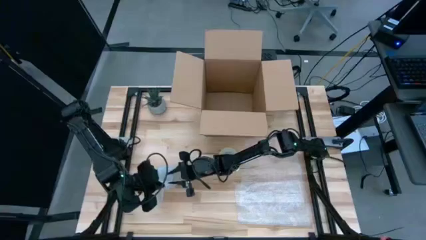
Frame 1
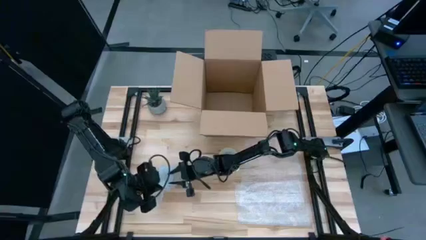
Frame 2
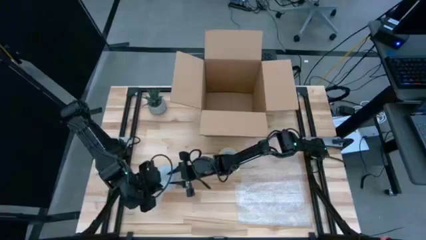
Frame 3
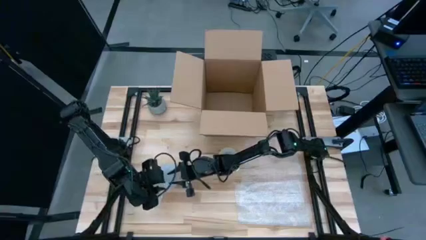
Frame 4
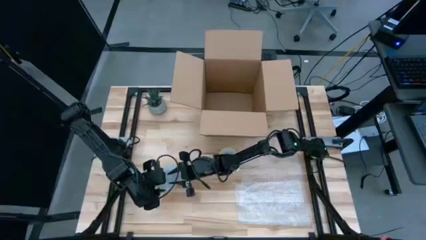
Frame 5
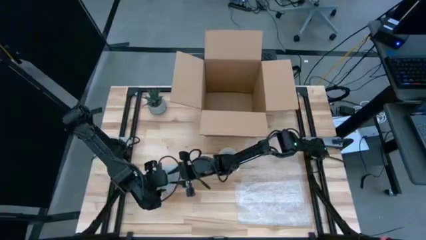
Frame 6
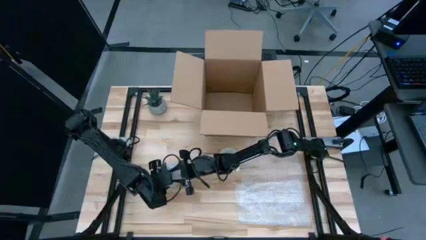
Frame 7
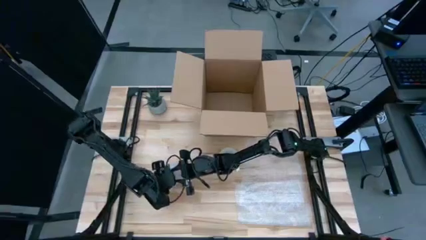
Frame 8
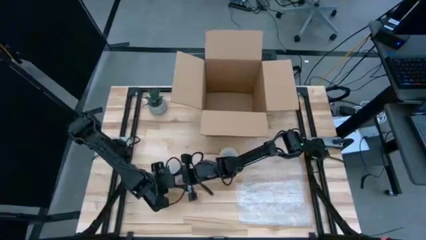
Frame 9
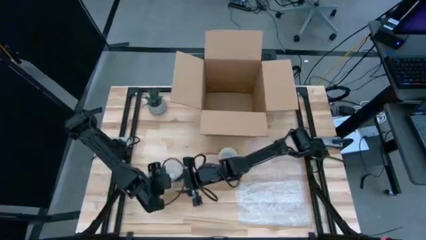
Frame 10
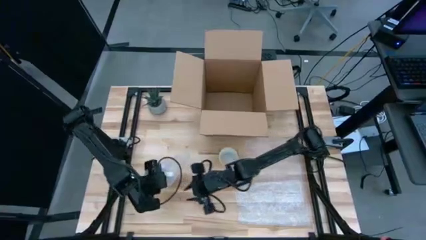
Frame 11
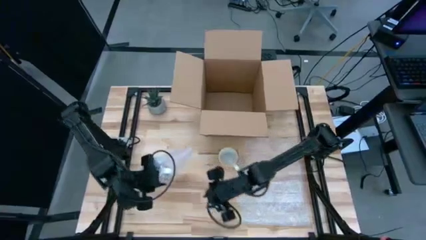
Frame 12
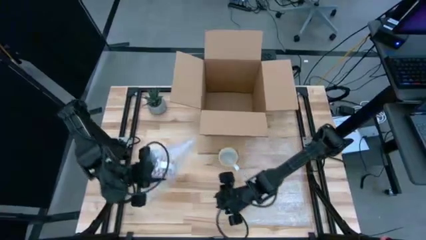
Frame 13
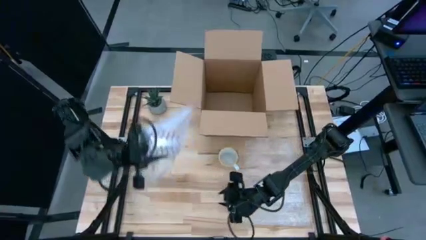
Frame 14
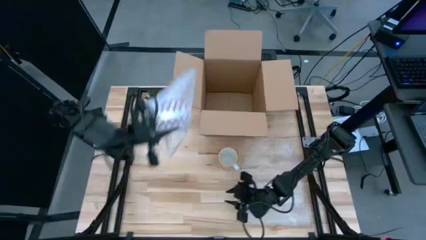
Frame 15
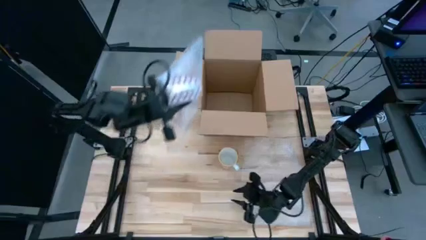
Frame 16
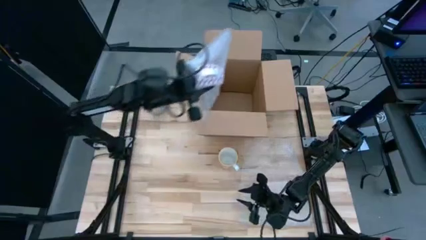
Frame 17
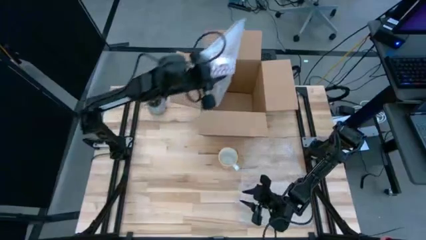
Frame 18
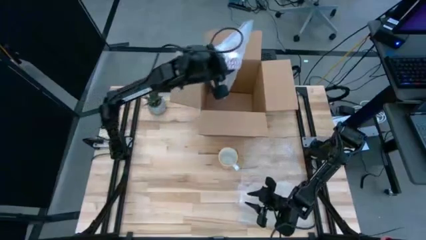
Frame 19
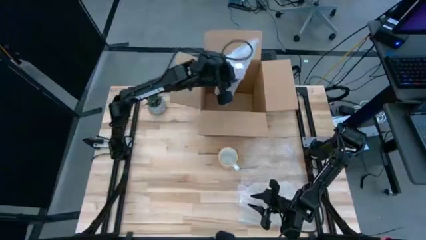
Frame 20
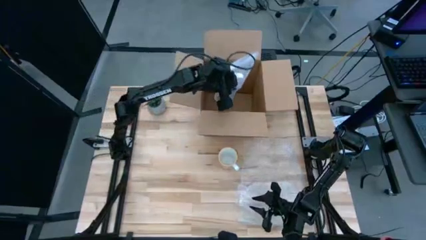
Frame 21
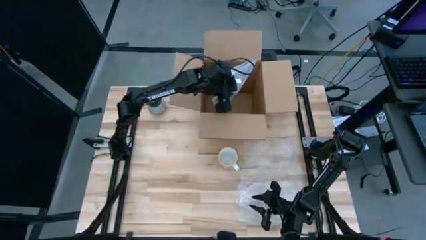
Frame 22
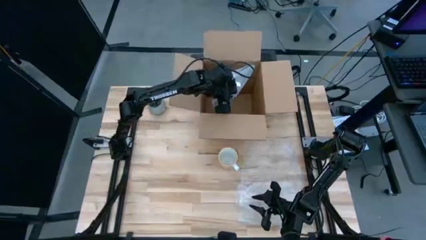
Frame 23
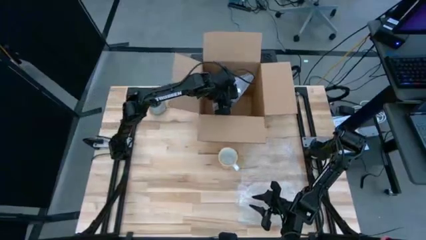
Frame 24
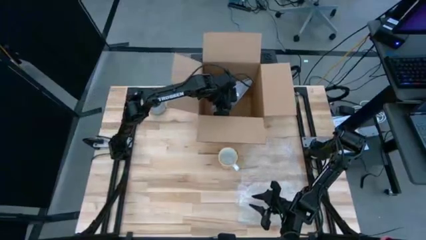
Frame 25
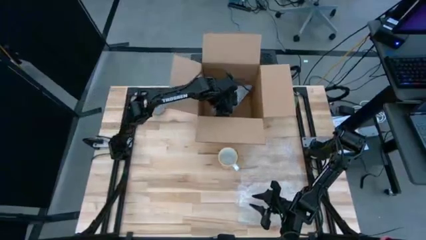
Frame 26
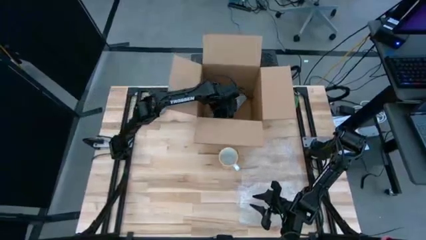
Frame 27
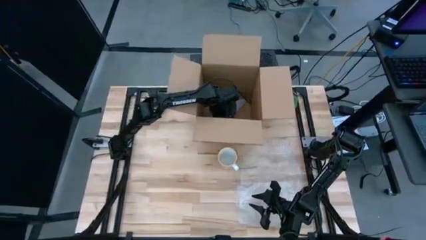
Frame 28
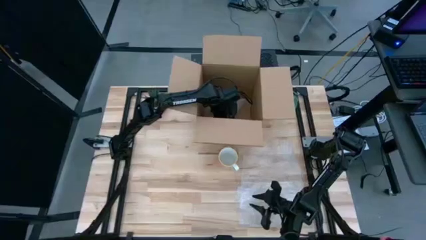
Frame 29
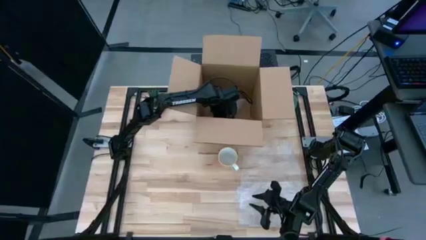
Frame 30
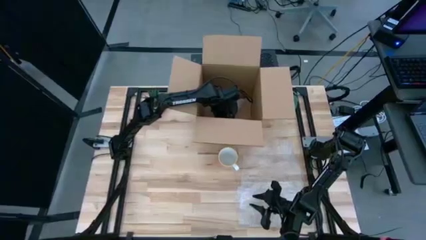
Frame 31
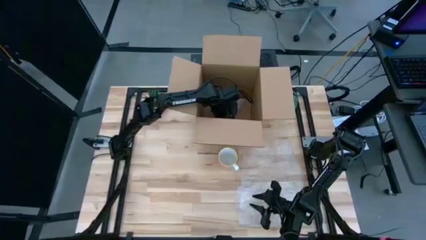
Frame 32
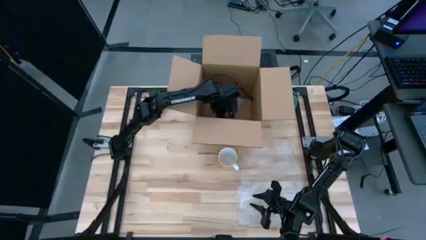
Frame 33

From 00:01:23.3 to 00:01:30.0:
Task: wrap mug
Put the wrapped red mug into the box

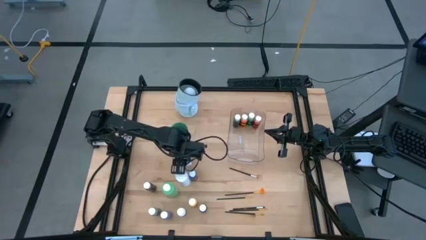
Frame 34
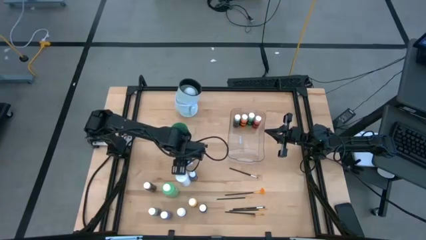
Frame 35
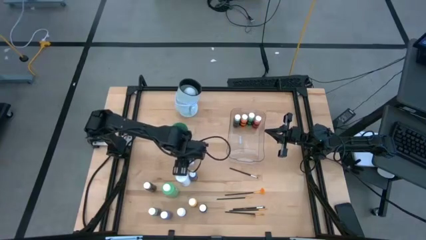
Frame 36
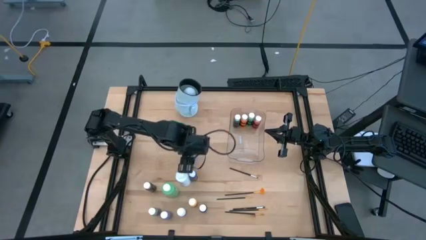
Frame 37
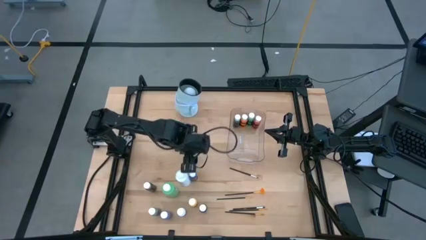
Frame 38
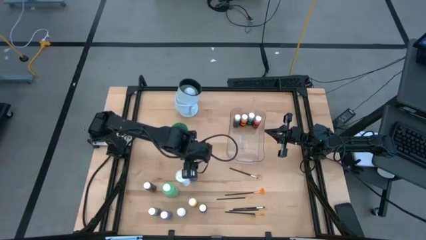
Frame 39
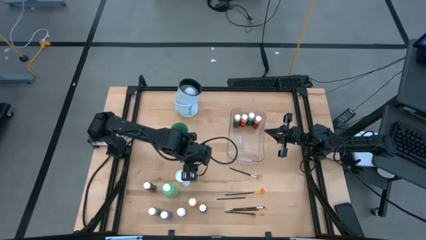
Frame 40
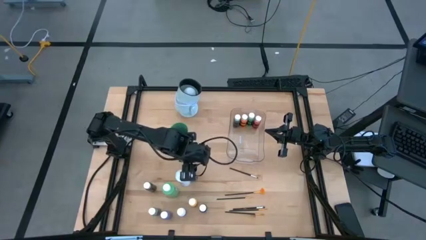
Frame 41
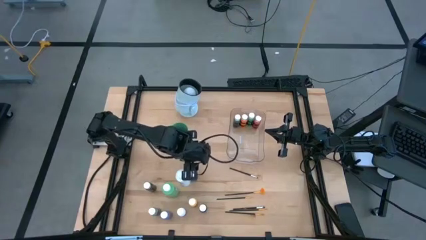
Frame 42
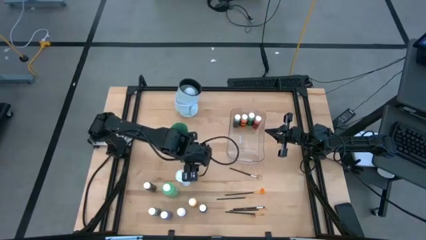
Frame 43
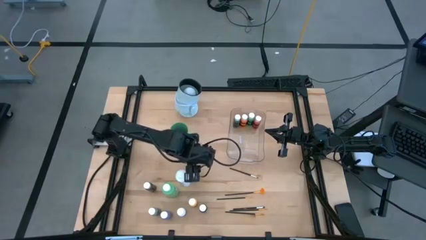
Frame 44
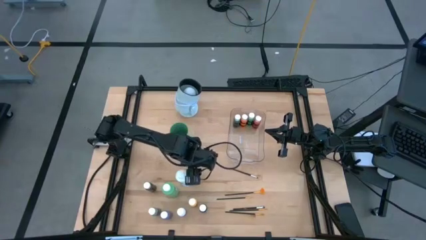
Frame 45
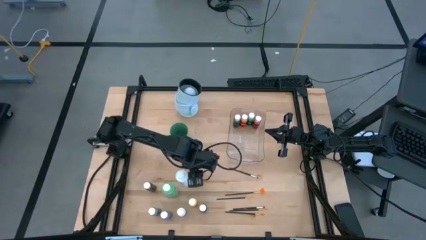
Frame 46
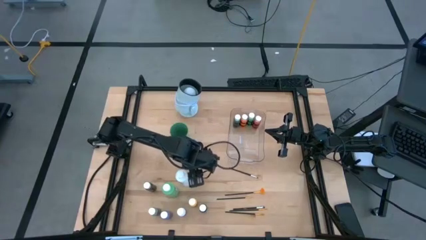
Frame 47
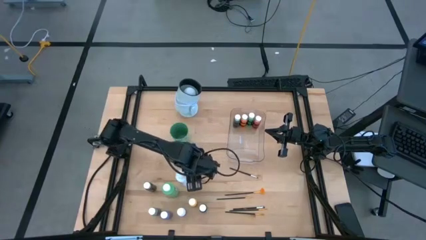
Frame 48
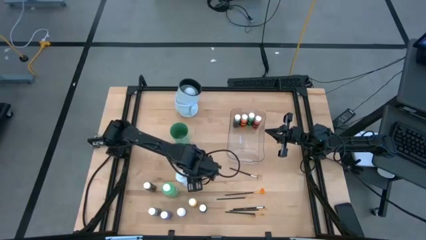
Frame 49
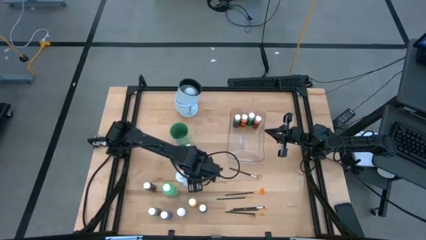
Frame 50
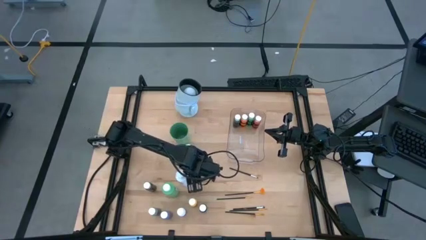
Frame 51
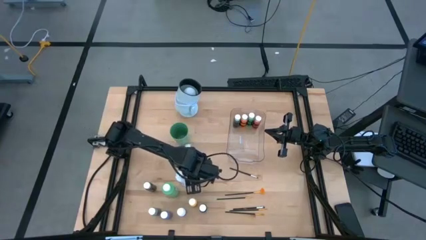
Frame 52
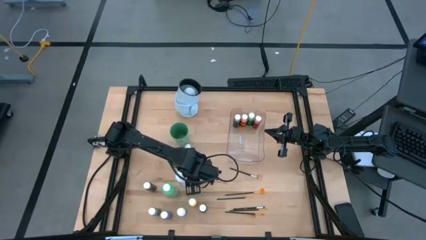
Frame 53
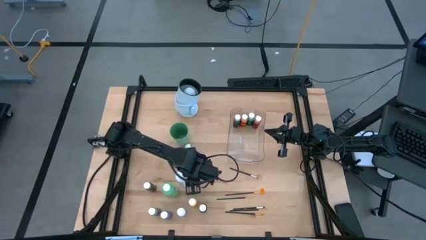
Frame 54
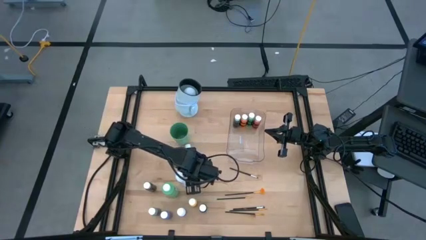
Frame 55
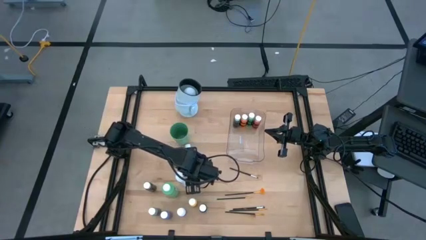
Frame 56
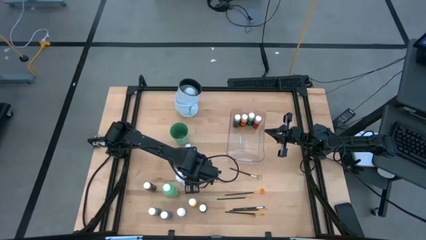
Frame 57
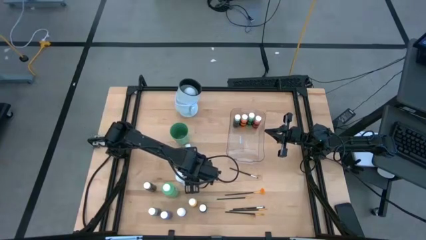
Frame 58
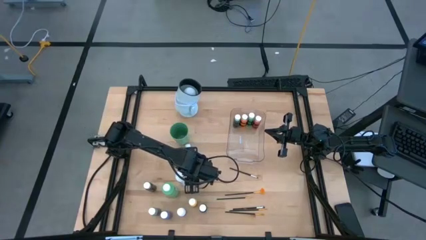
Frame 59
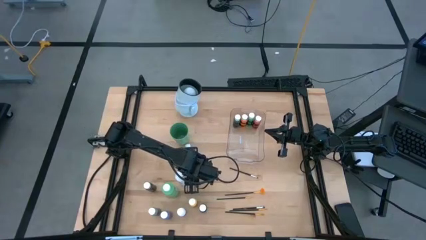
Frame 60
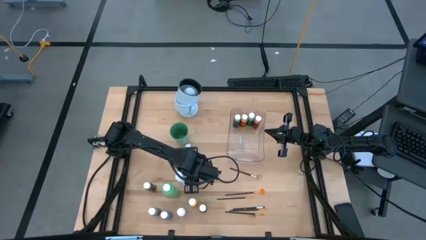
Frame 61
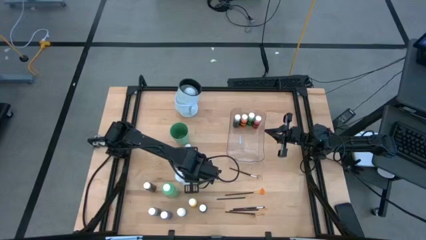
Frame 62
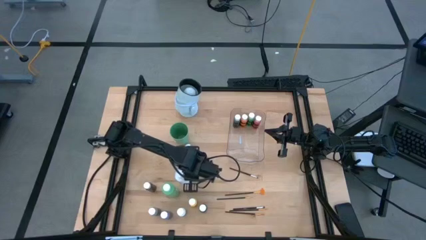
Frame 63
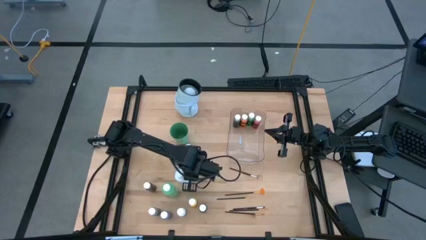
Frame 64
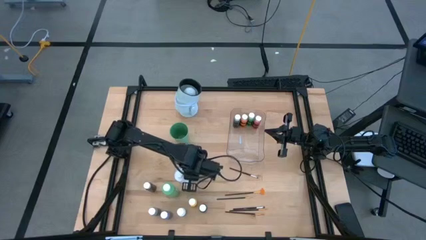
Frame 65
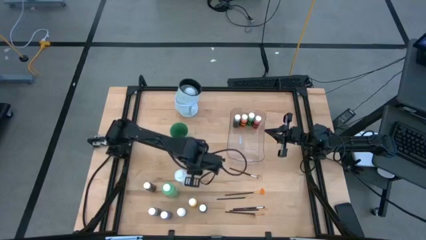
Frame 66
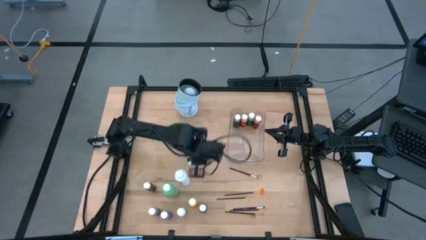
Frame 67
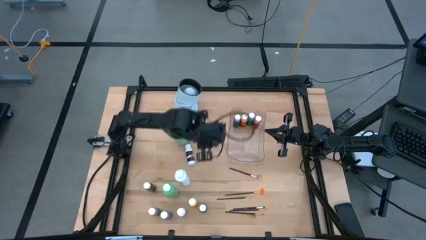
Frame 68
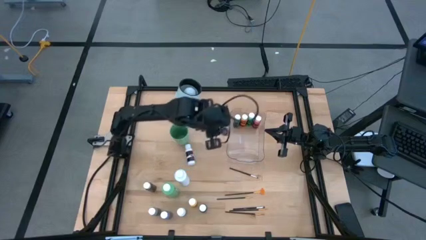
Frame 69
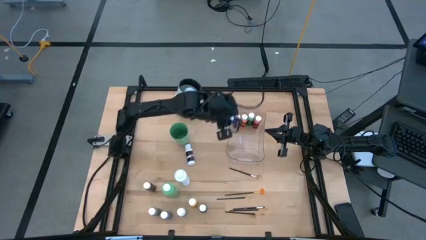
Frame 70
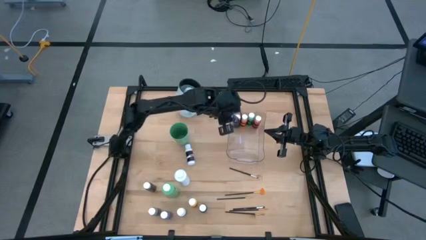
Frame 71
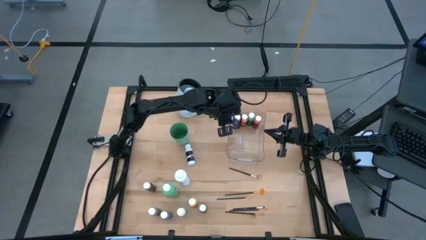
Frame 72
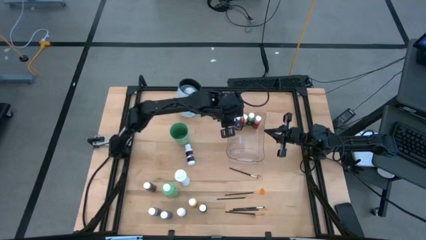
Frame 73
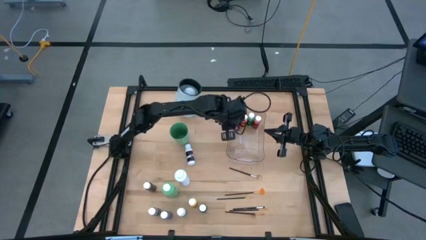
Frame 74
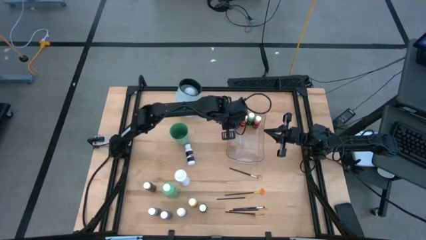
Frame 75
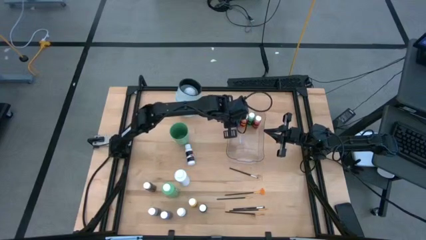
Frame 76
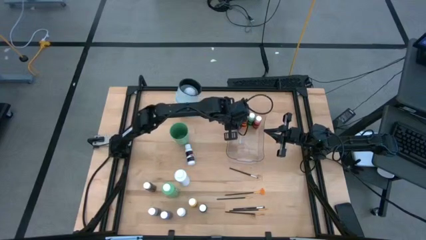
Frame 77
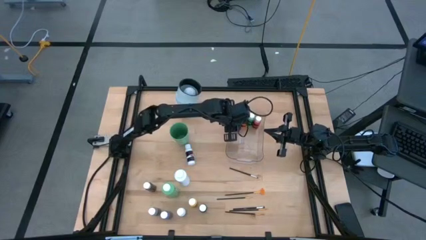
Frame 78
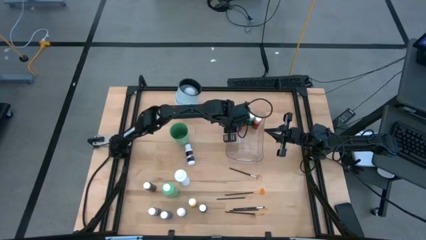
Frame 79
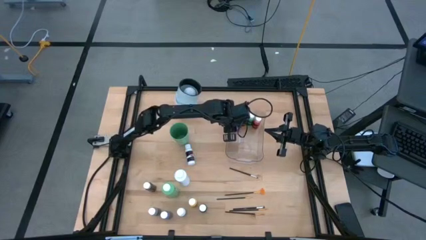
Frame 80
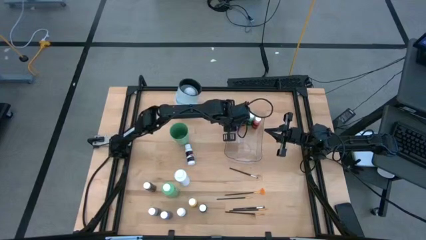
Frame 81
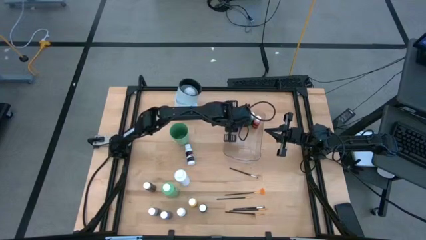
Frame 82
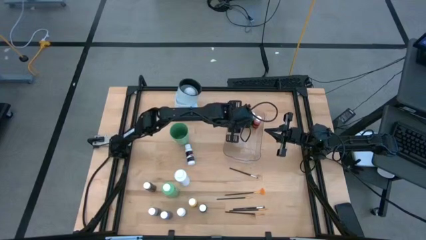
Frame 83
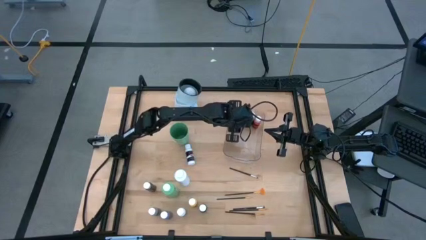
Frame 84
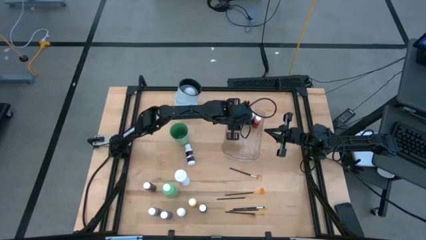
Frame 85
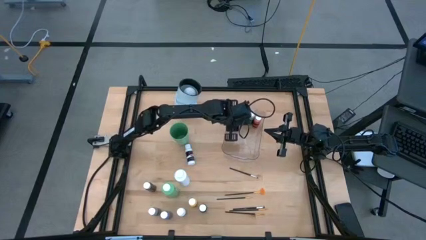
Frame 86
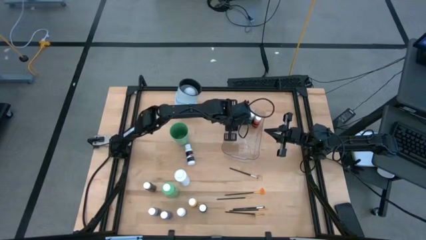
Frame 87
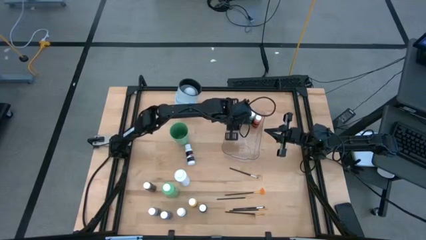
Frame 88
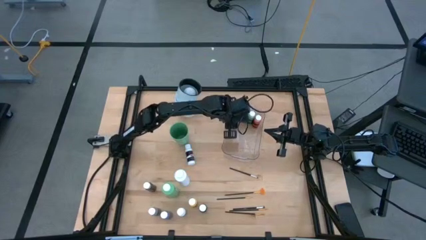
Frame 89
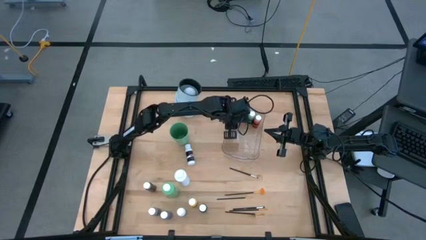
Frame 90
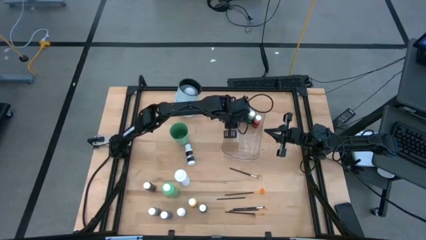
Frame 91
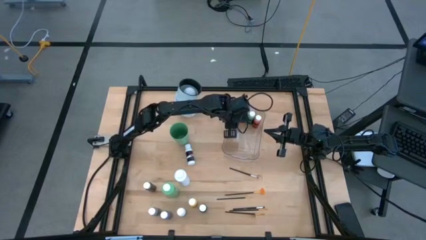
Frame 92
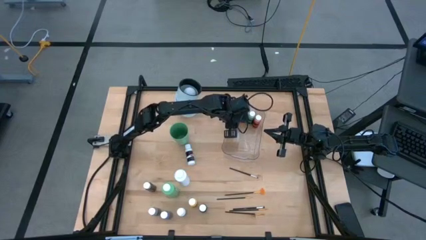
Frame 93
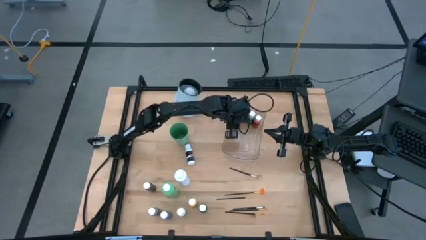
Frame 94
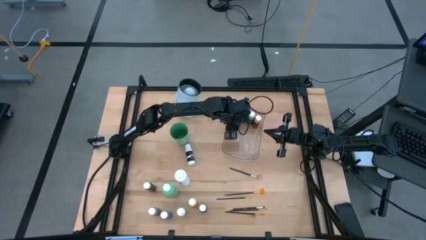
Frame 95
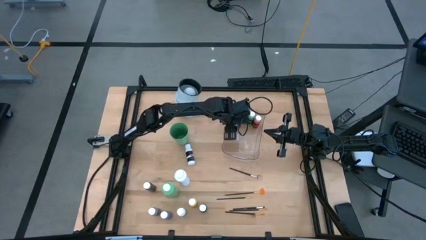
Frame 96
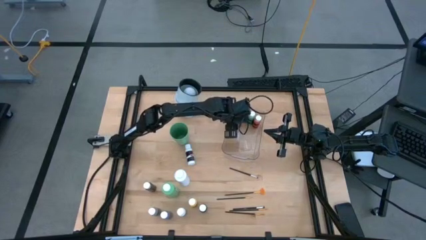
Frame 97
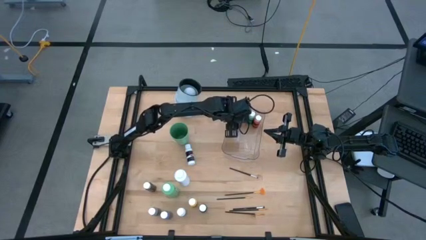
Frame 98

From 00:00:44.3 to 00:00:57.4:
Task: Pick & Place Paint Supplies
Put the blue paint bottle into the transparent bin
